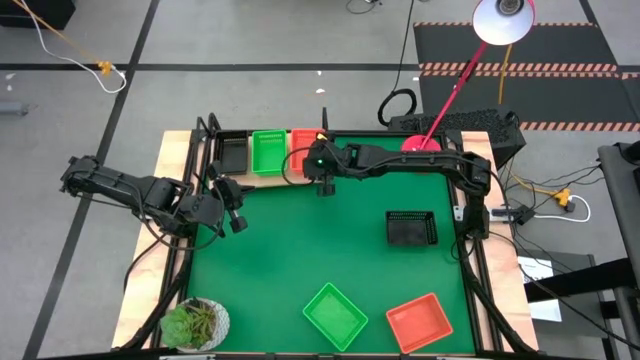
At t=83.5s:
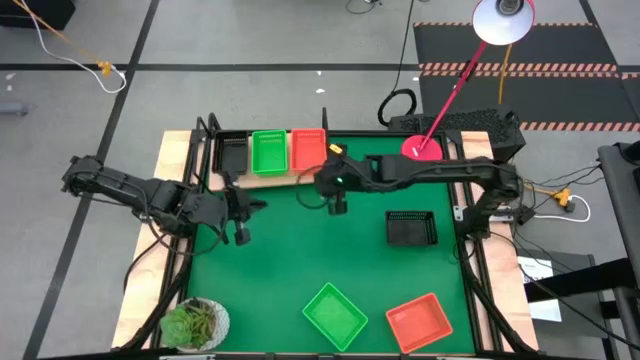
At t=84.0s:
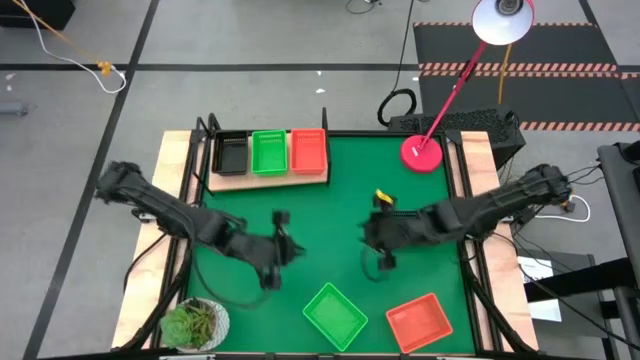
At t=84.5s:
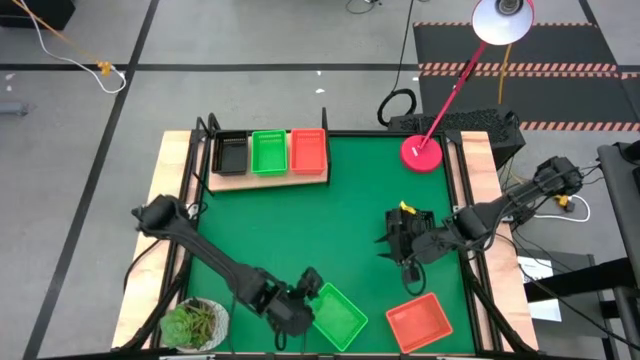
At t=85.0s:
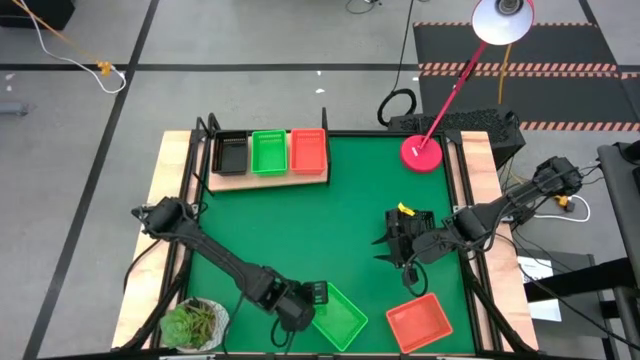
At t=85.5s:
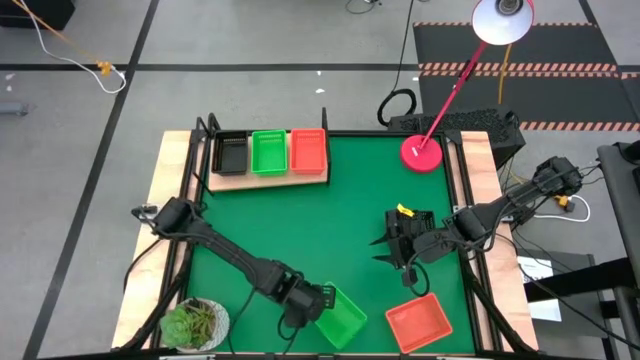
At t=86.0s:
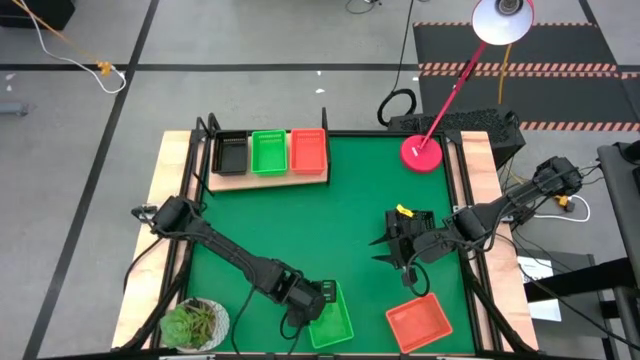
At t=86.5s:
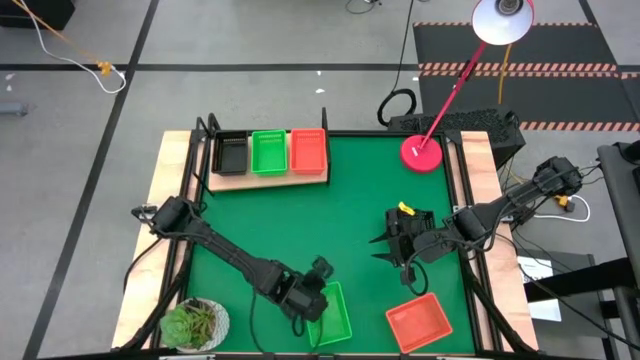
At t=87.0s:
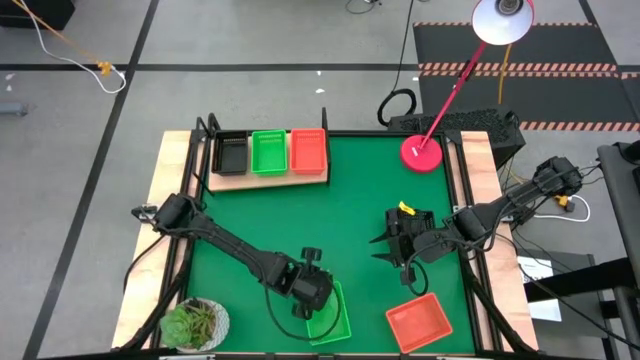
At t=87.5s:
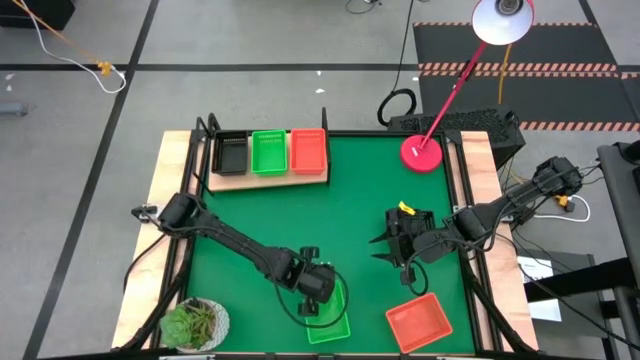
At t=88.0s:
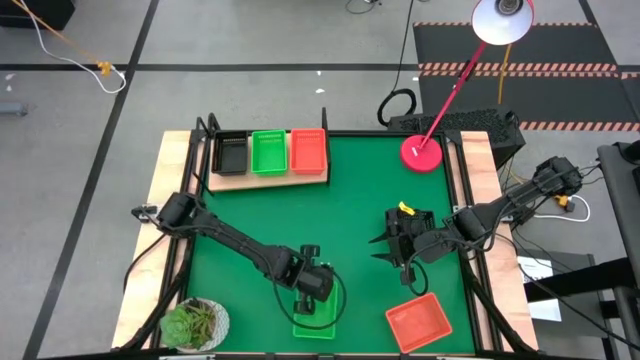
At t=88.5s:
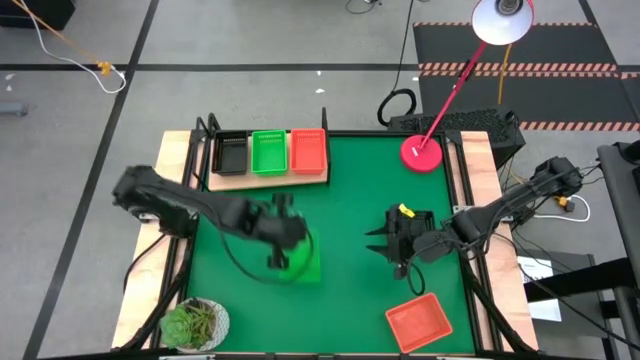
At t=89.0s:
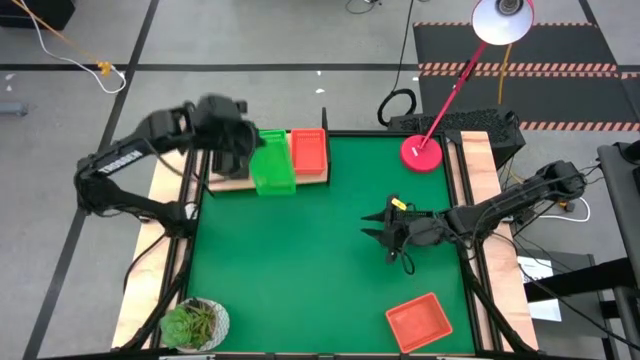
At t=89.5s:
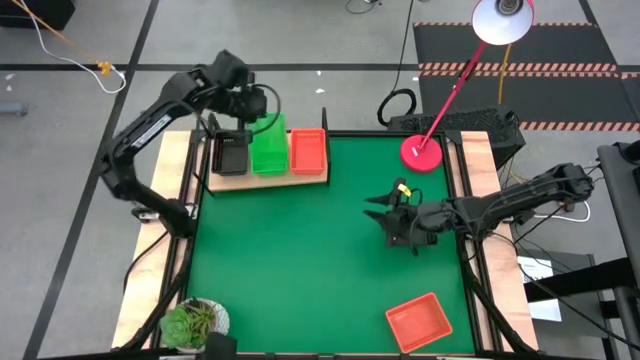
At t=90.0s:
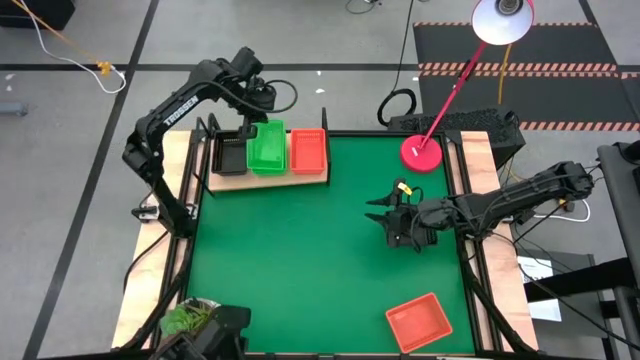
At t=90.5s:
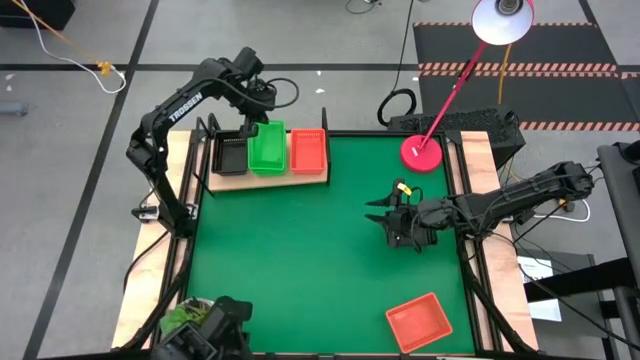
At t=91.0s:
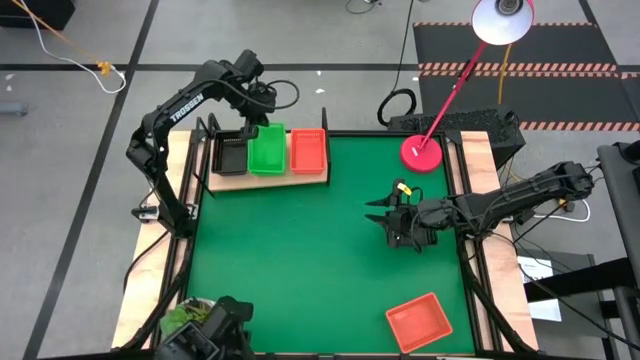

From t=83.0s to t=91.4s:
Task: Stack baskets on shelf by color
Stack the green bin on top of the green bin on the shelf

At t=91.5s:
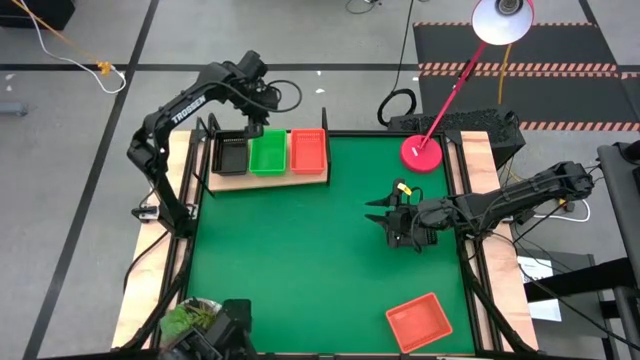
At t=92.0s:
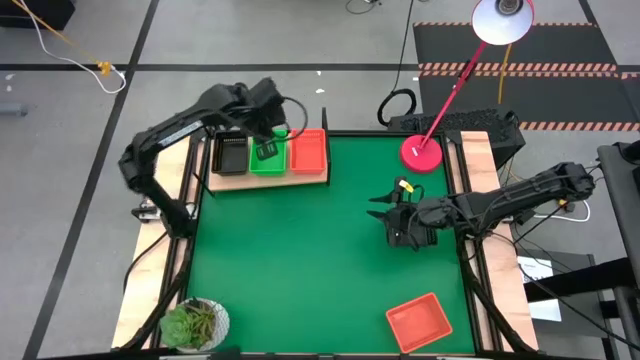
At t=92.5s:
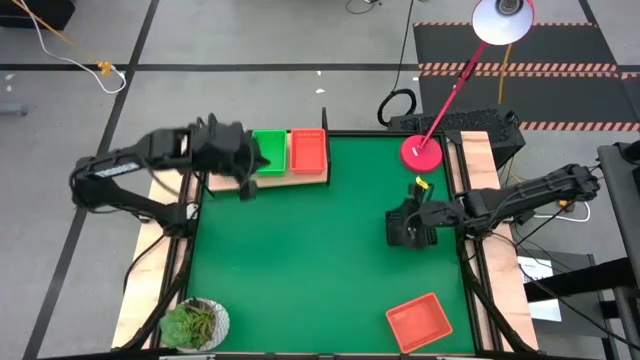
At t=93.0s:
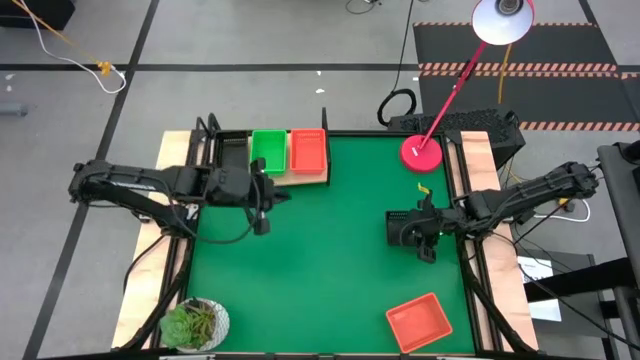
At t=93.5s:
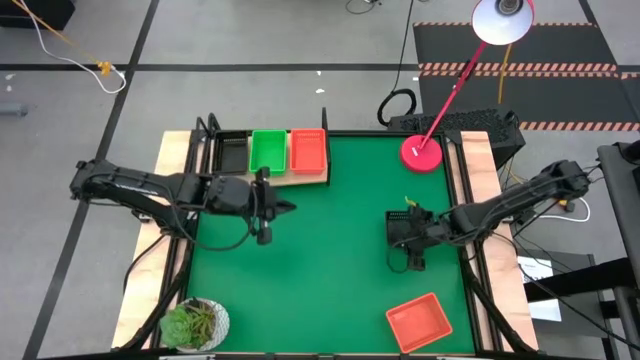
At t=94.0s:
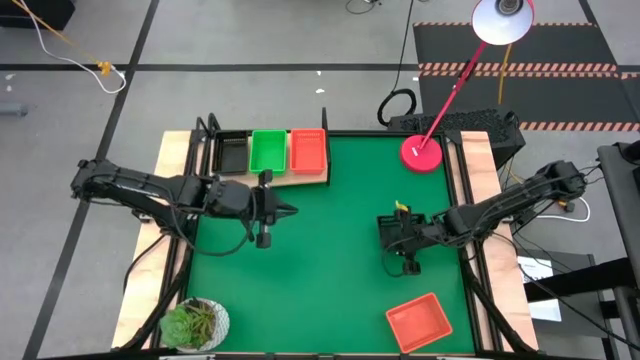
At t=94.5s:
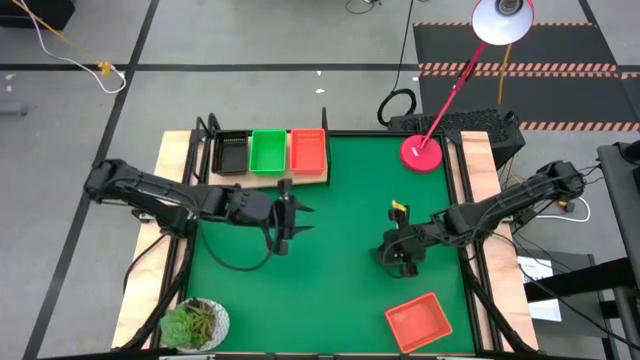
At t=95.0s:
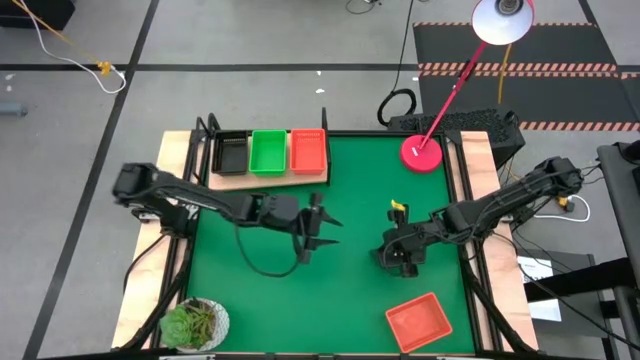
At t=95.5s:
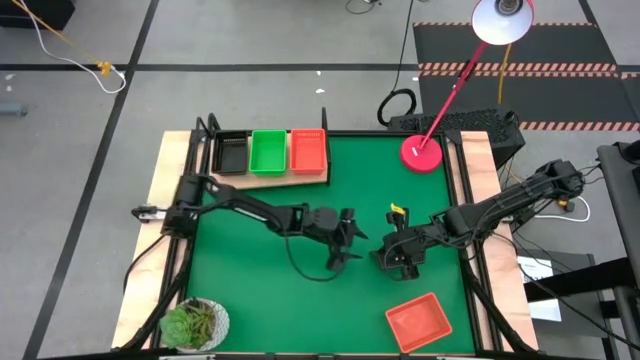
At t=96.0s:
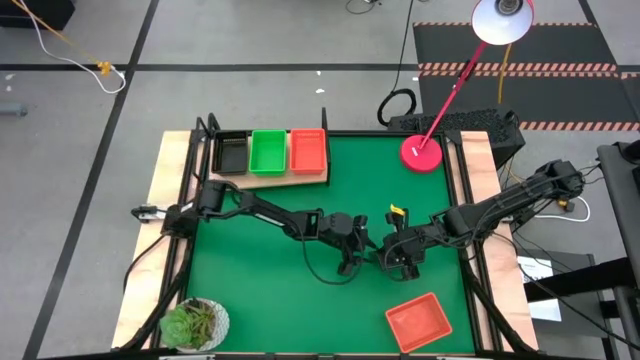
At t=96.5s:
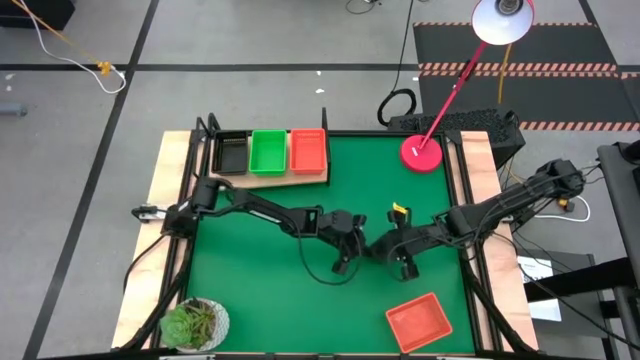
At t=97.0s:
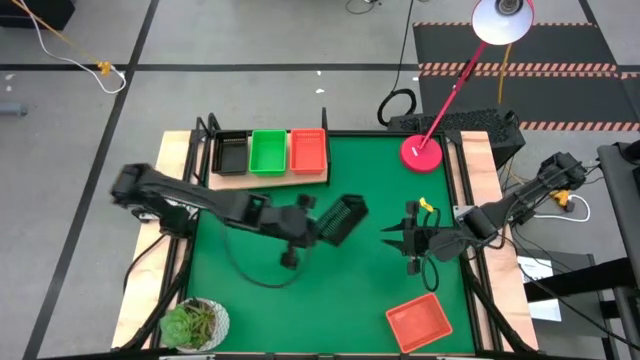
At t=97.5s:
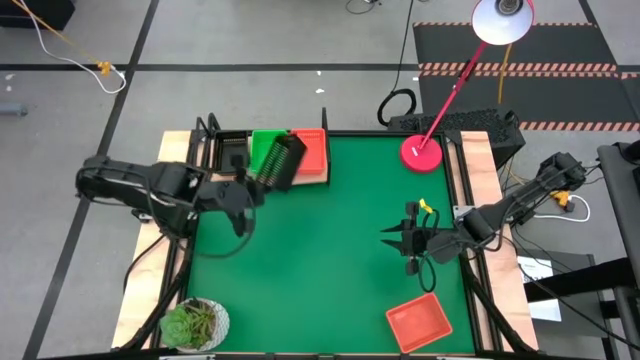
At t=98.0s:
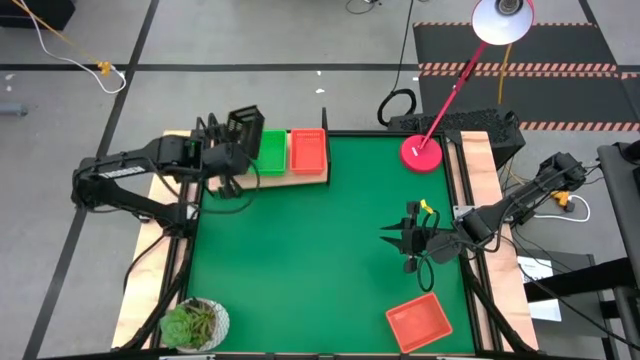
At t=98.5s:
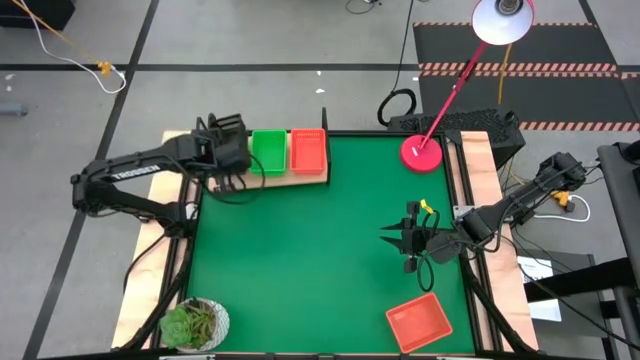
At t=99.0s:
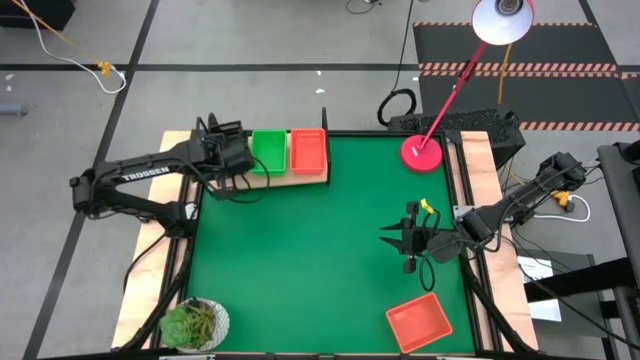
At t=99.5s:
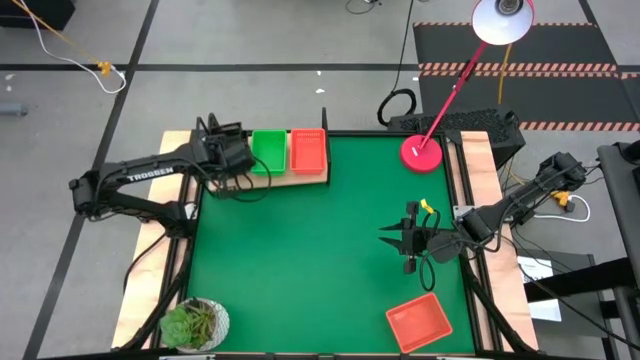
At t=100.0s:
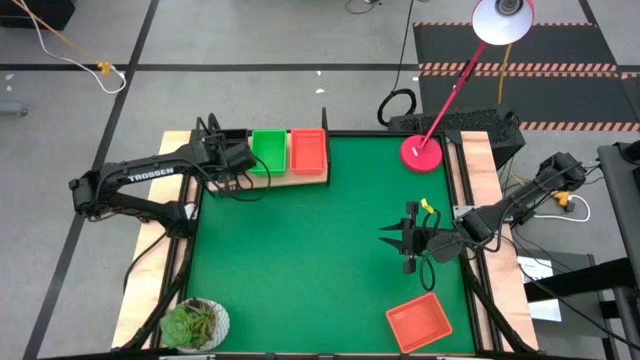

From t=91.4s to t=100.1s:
Stack the black bin on top of the black bin on the shelf
